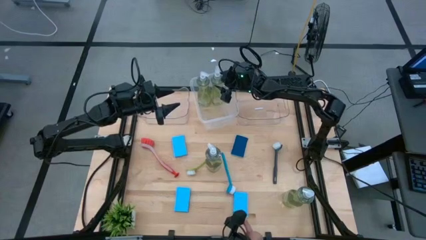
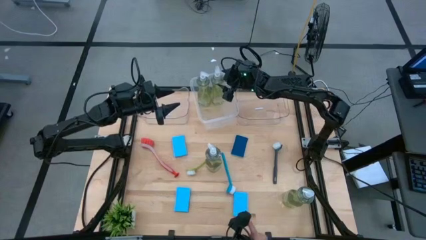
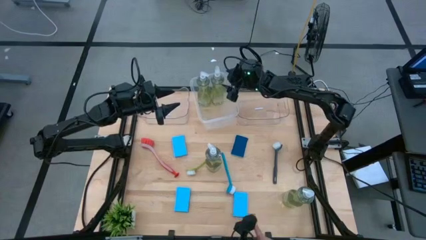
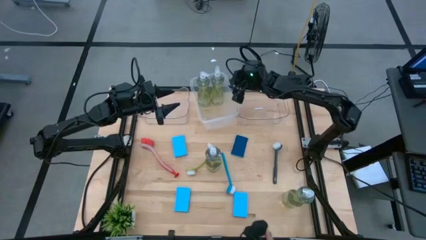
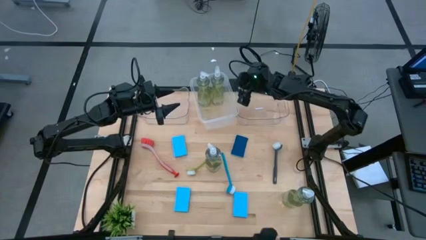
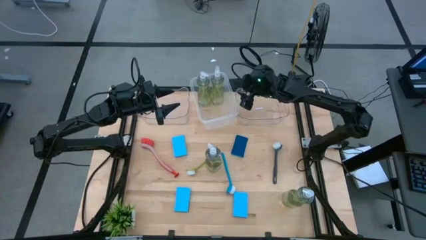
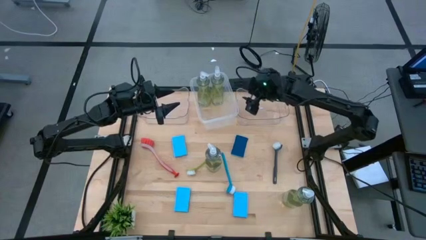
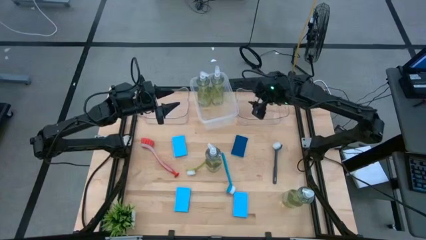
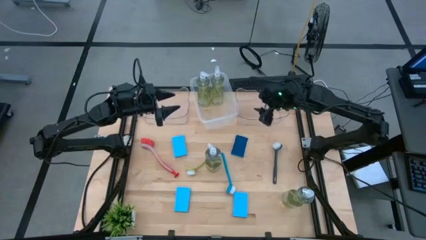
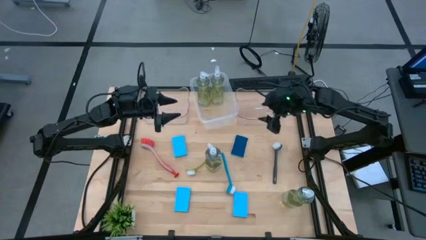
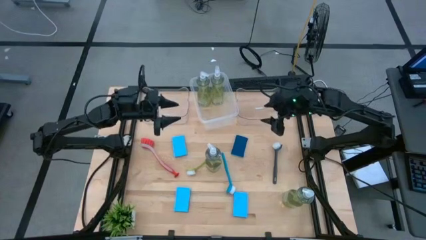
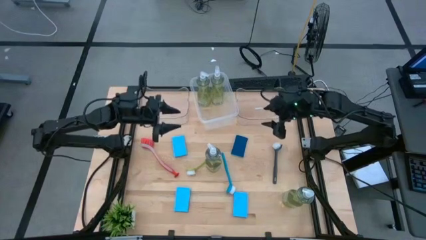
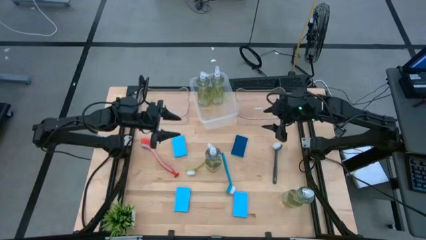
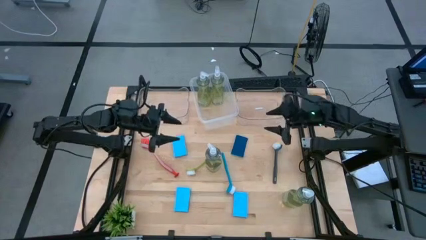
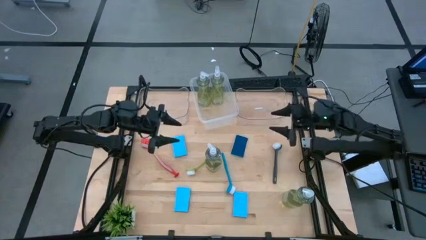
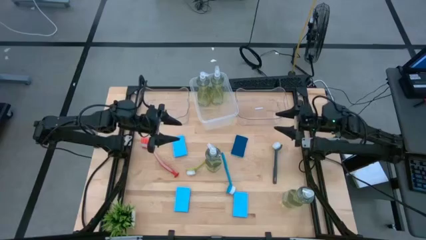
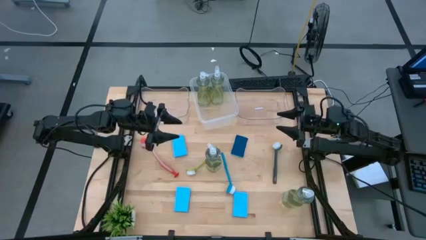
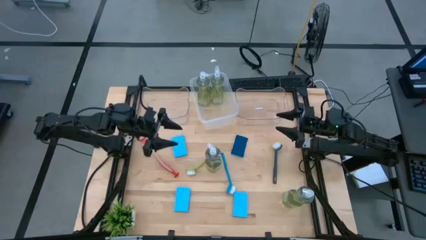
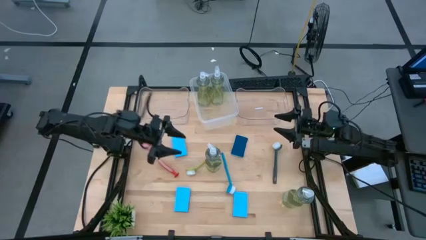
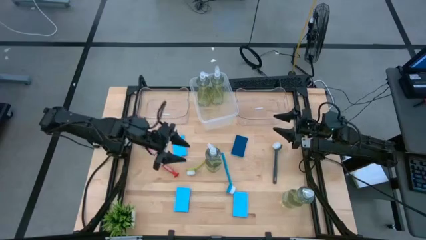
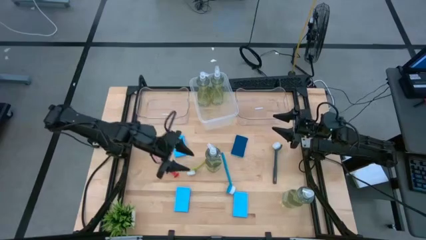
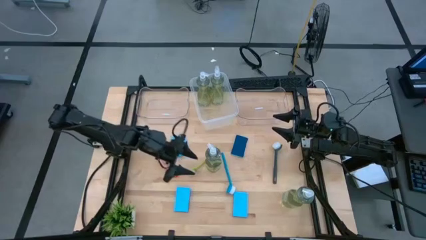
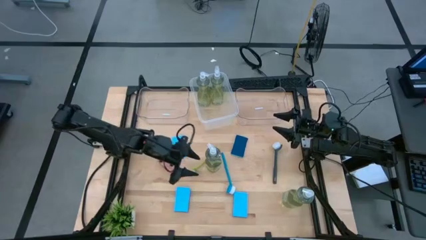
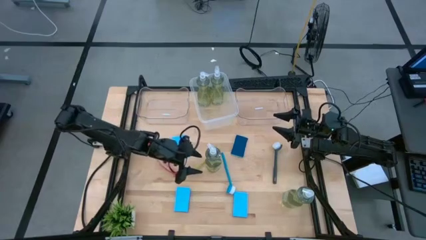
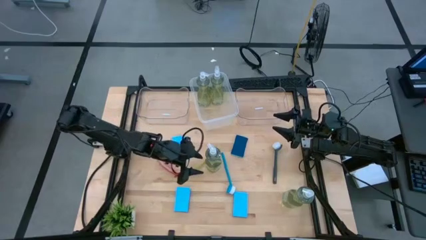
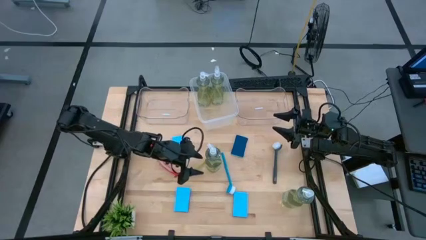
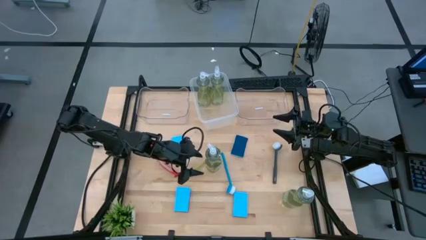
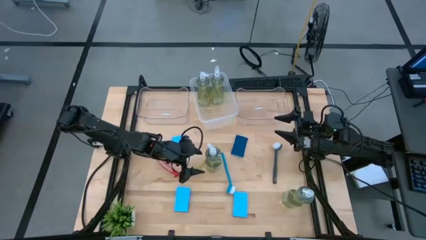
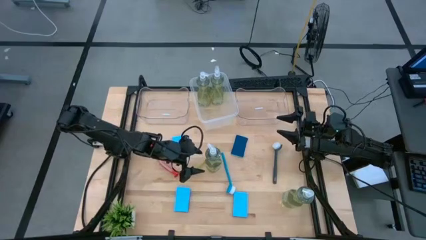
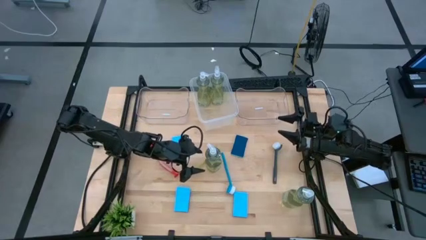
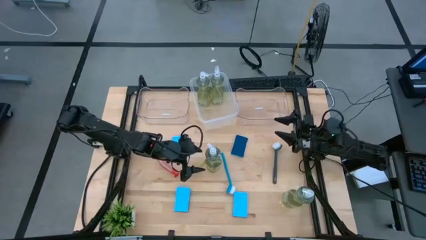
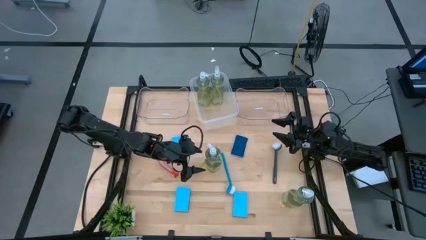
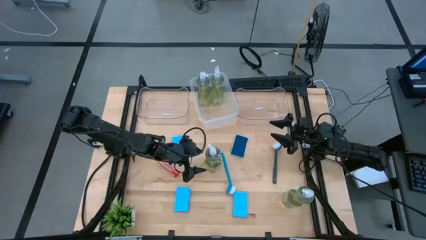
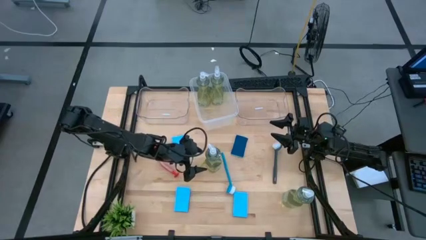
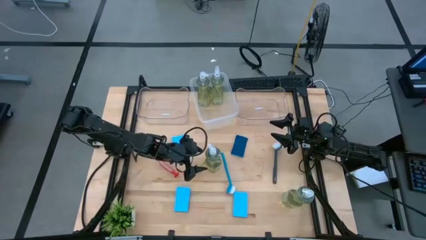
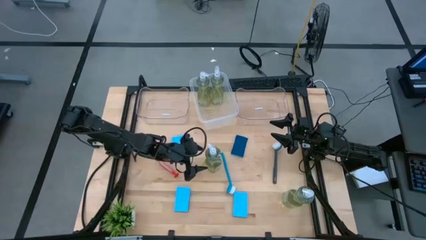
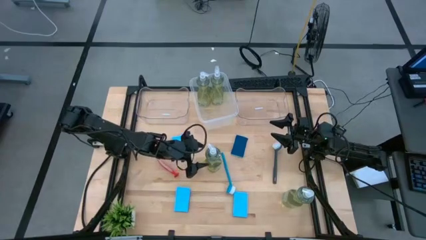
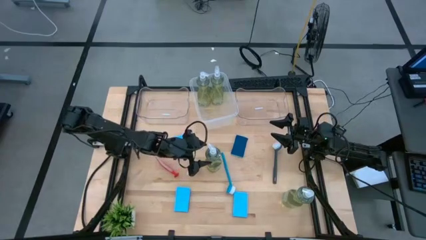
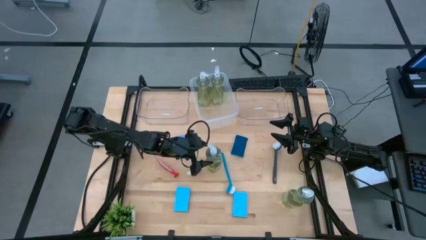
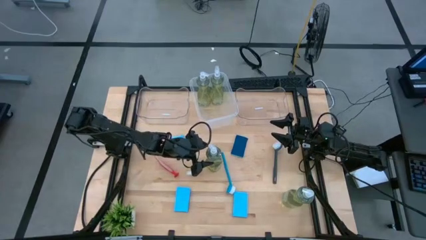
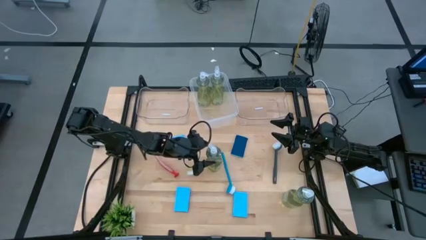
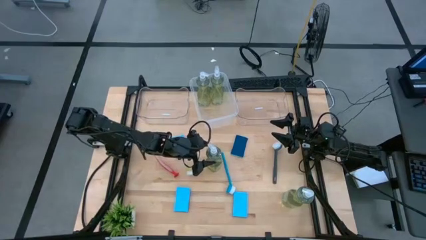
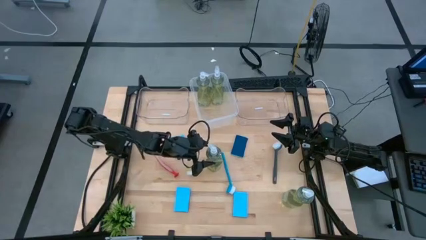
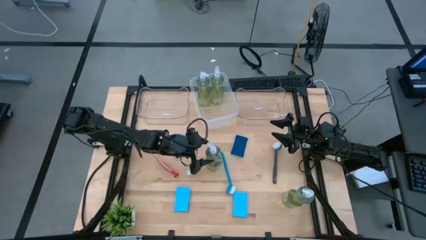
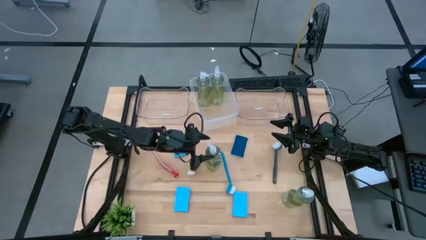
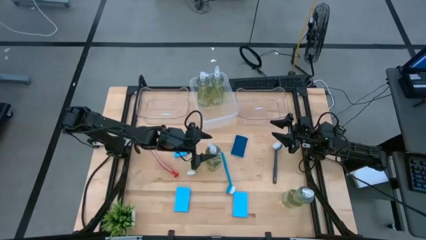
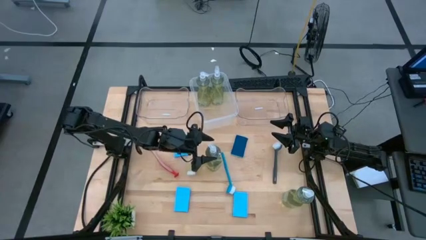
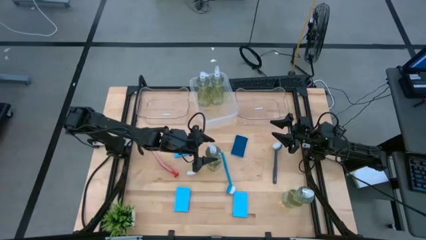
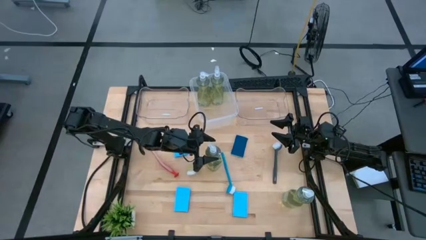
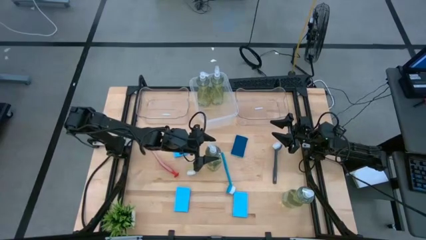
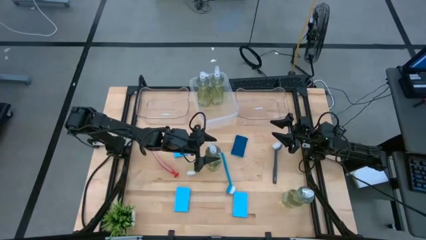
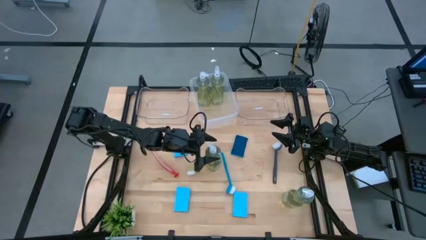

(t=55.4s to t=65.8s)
Task: Pick & Place Kitchen Sink Supplies
Put the green soap dispenser into the transparent white bin

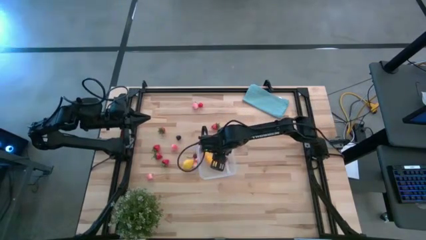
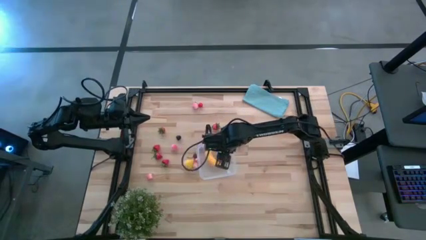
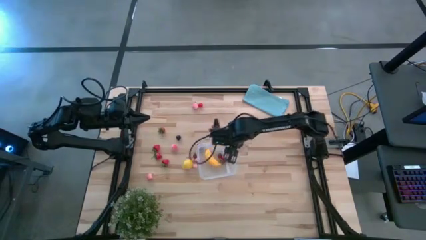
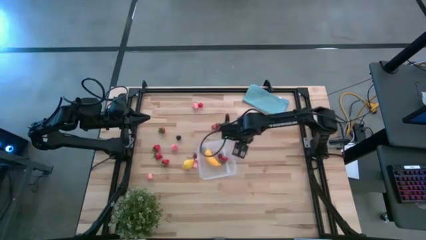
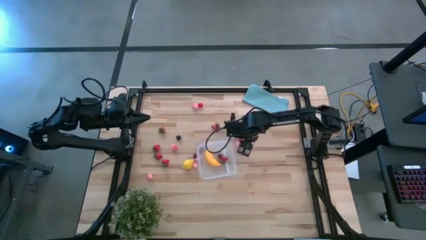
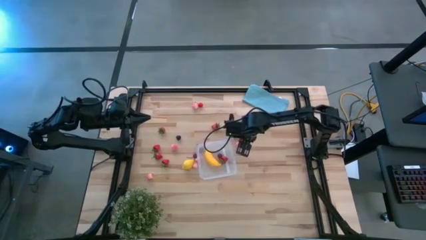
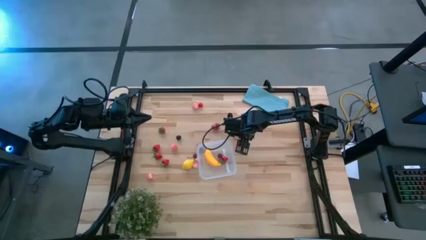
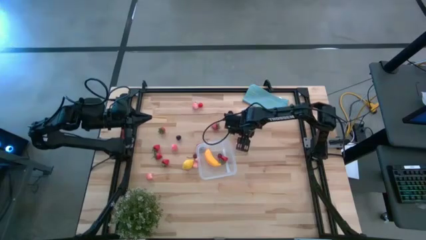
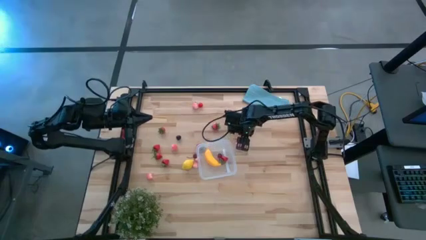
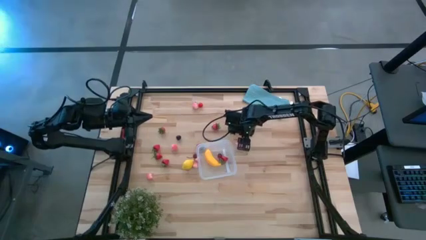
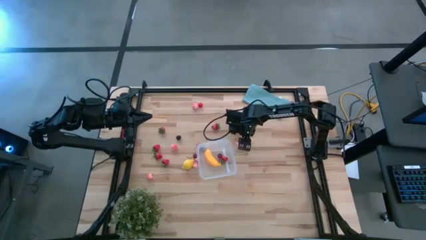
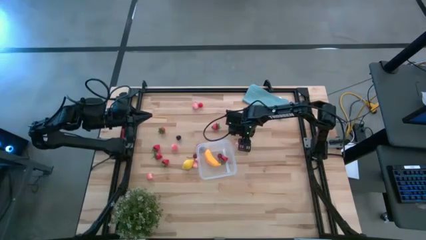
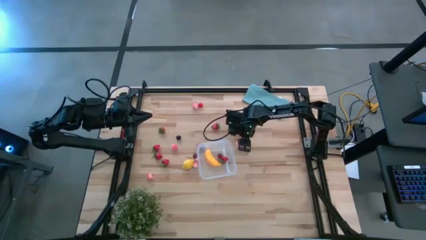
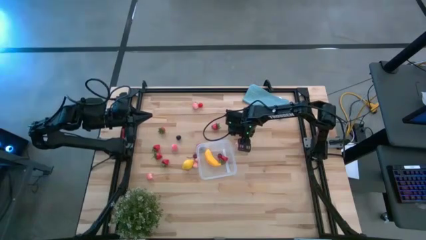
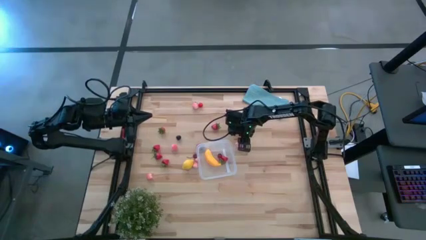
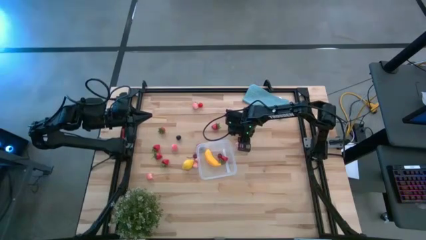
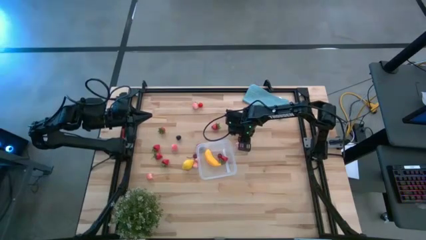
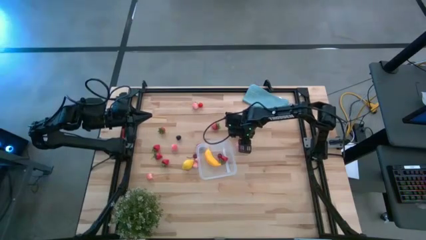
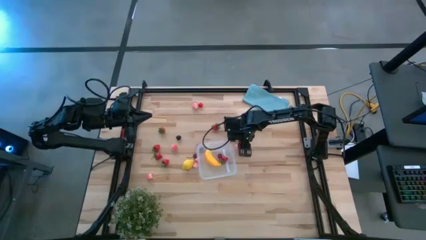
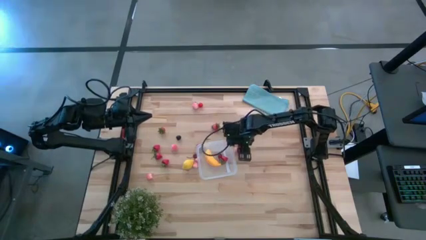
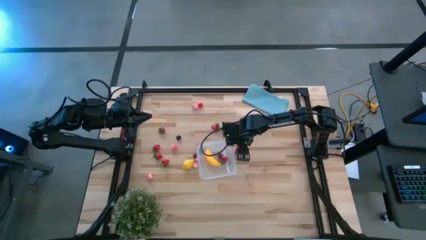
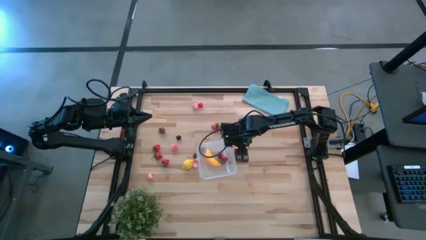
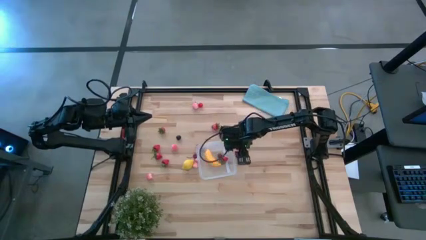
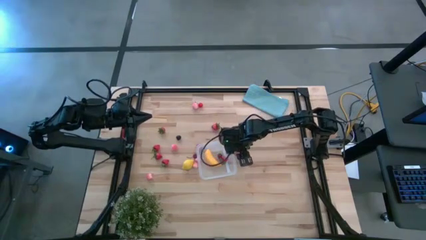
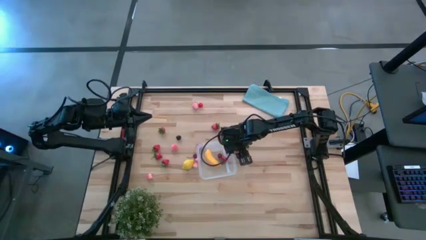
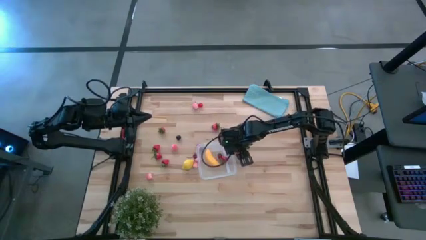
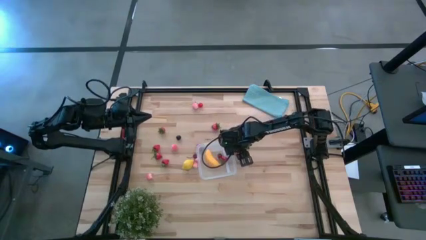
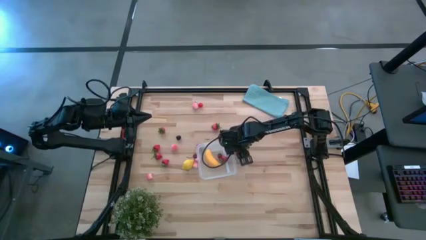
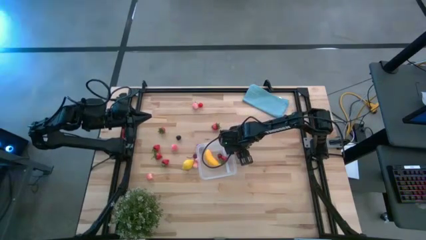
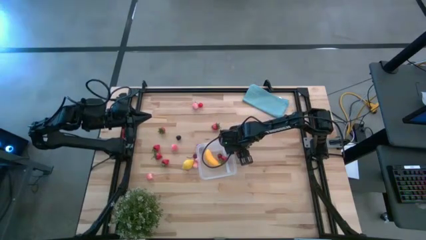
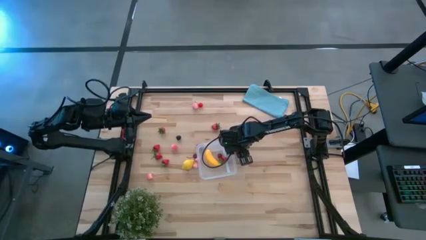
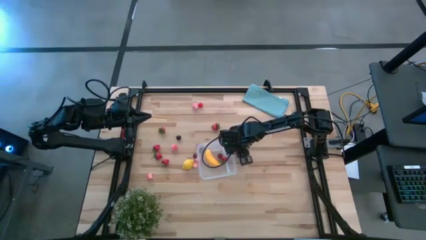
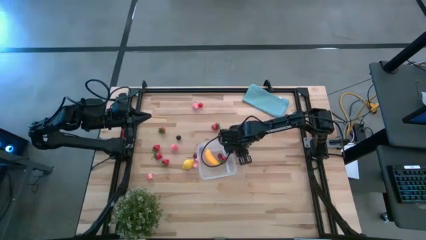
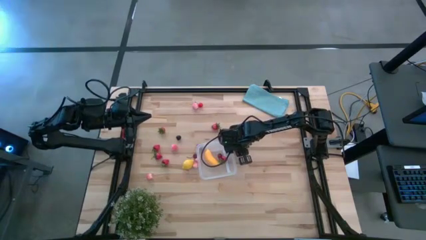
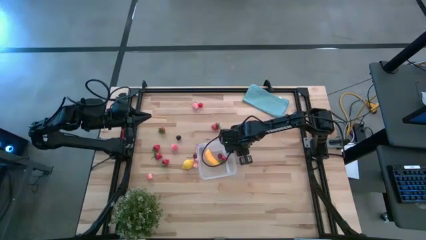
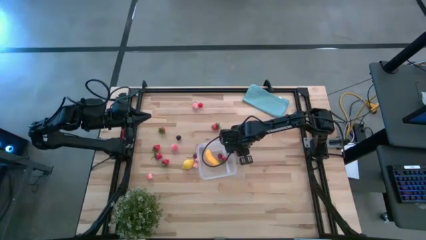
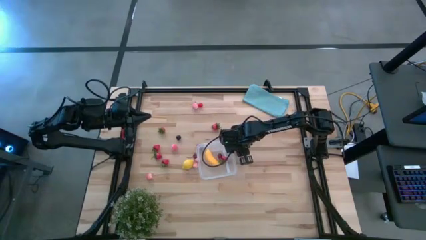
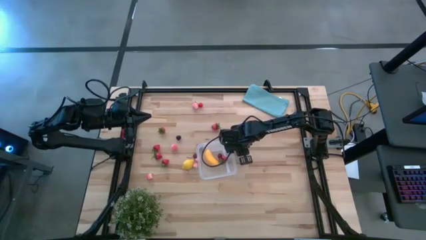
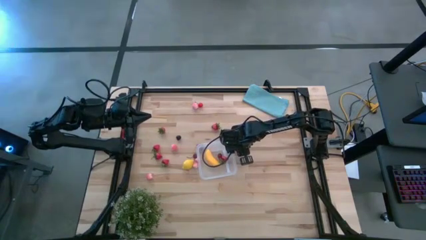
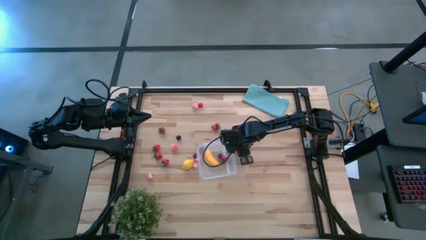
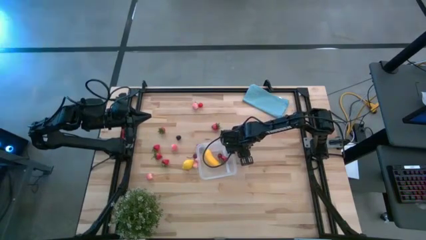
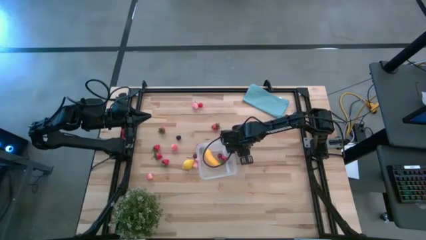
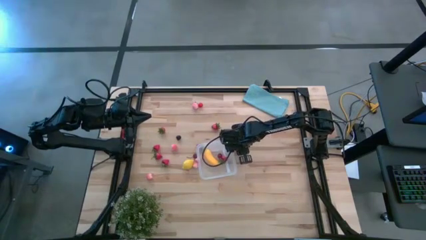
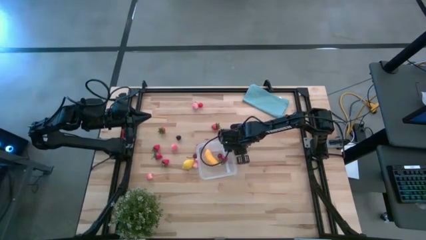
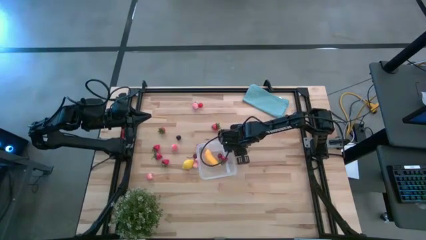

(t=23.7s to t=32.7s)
Task: Pick and placing Produce into tupperware
Put the pink peach into the transparent bin
